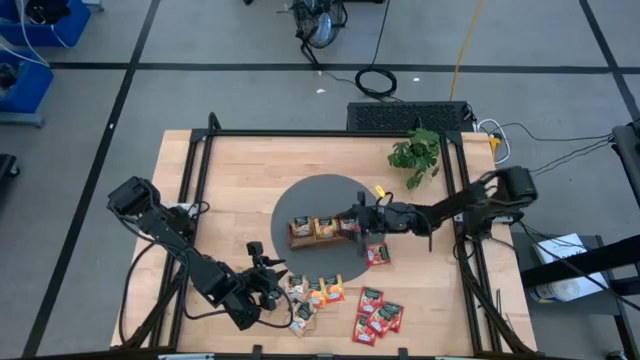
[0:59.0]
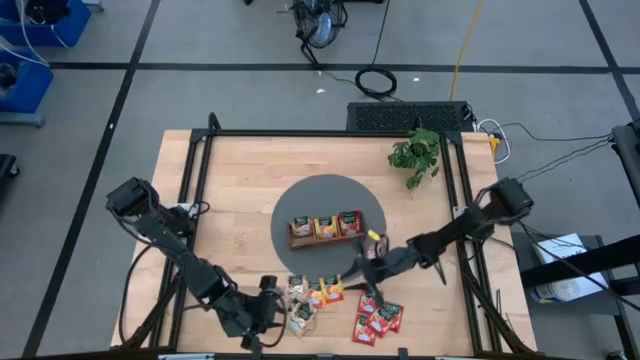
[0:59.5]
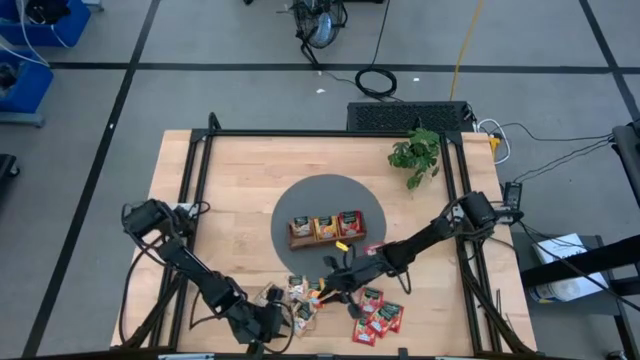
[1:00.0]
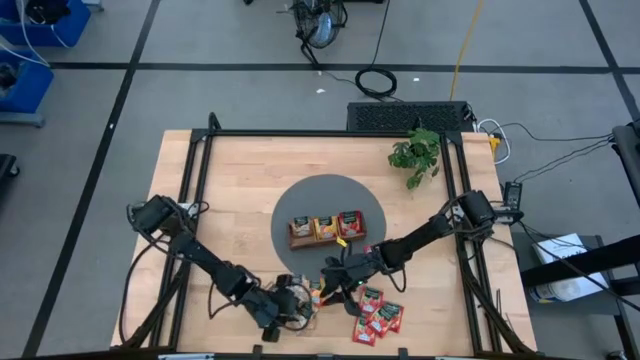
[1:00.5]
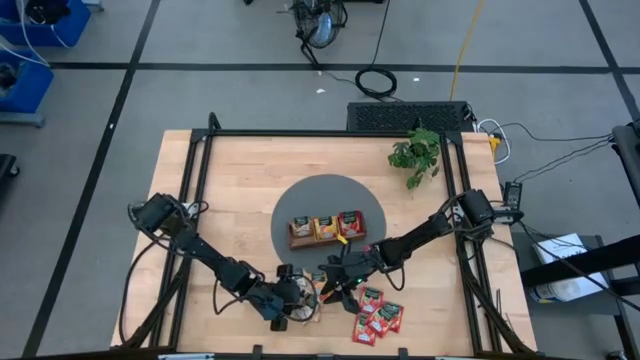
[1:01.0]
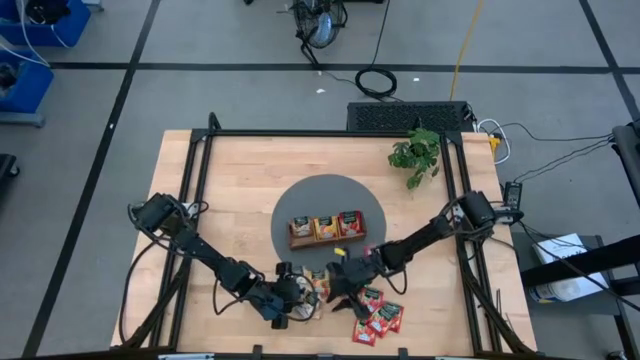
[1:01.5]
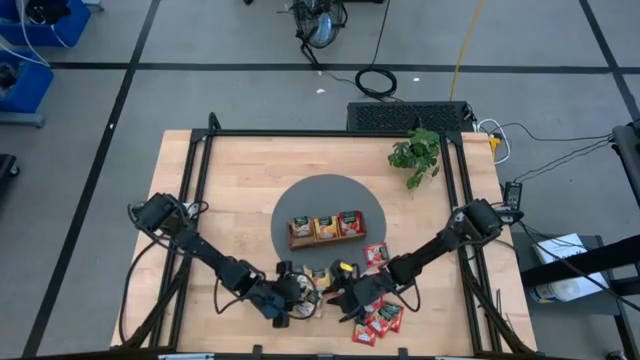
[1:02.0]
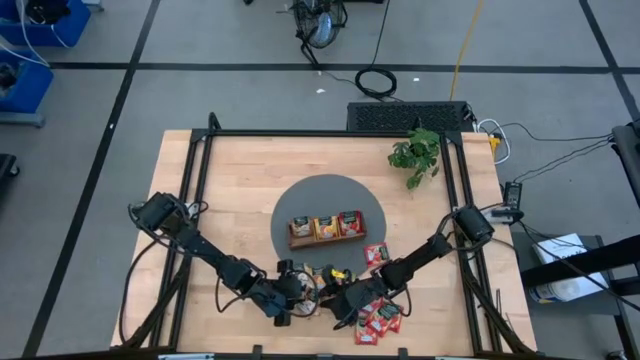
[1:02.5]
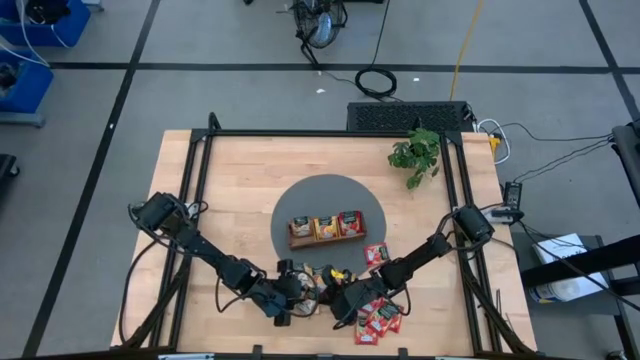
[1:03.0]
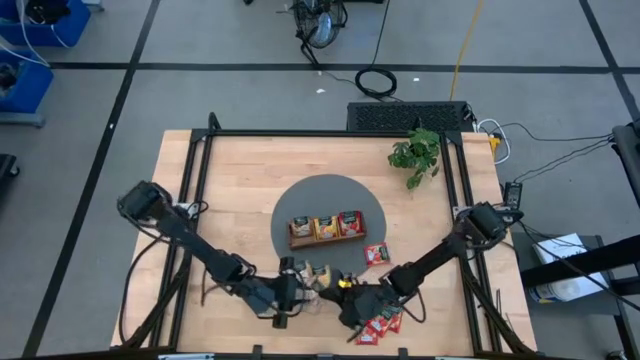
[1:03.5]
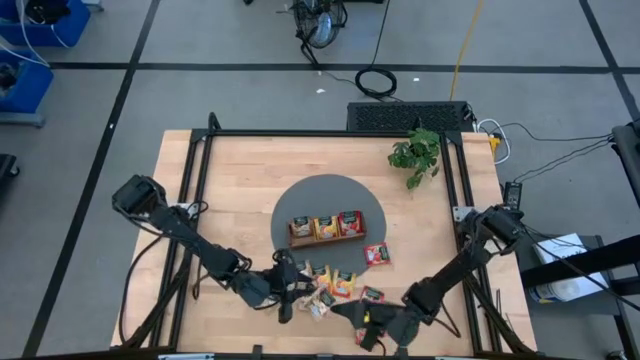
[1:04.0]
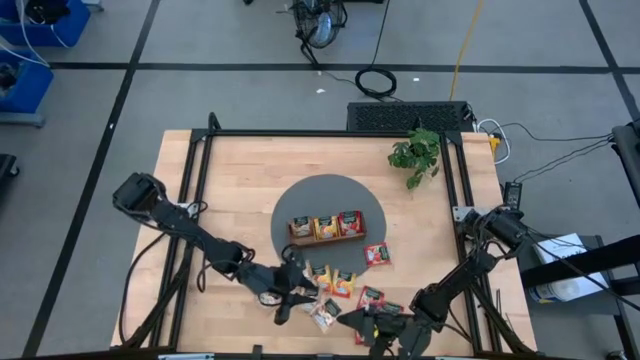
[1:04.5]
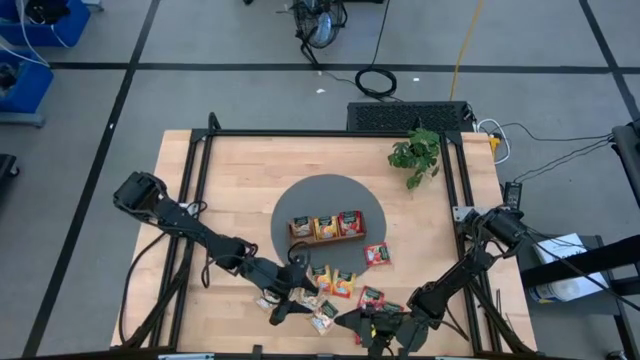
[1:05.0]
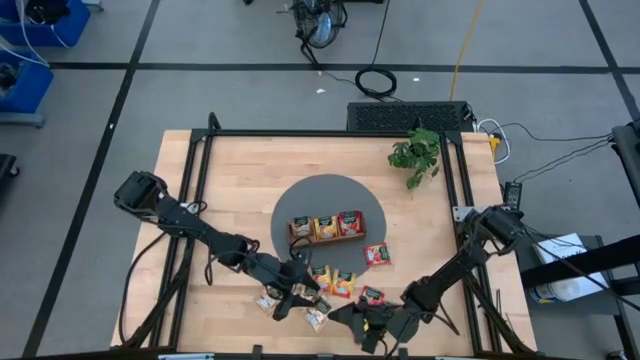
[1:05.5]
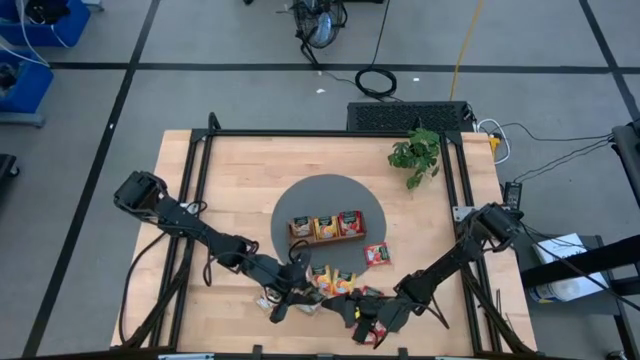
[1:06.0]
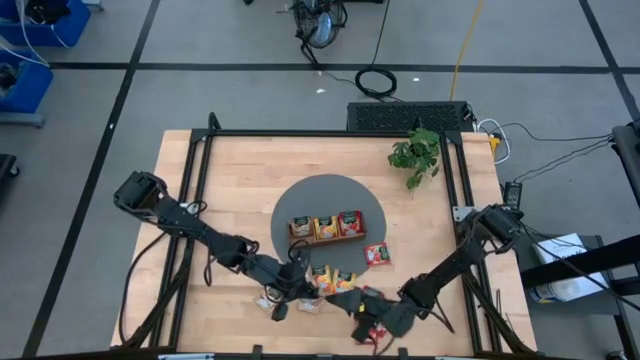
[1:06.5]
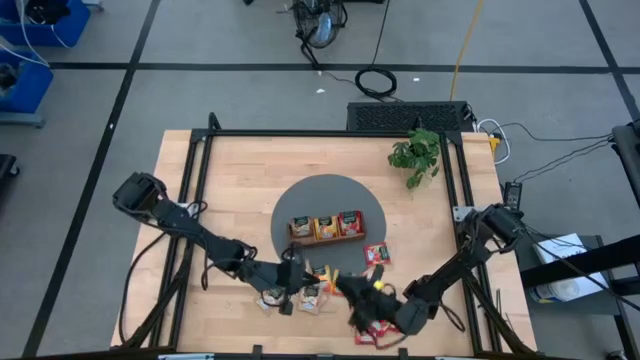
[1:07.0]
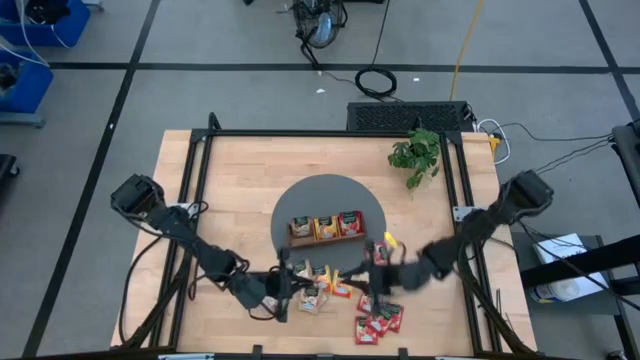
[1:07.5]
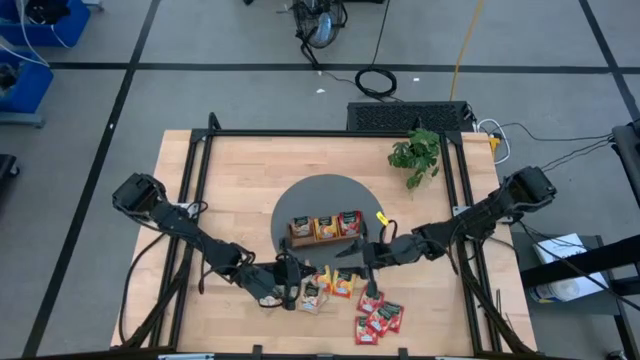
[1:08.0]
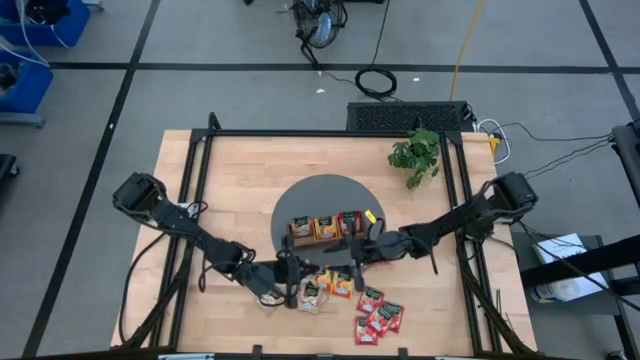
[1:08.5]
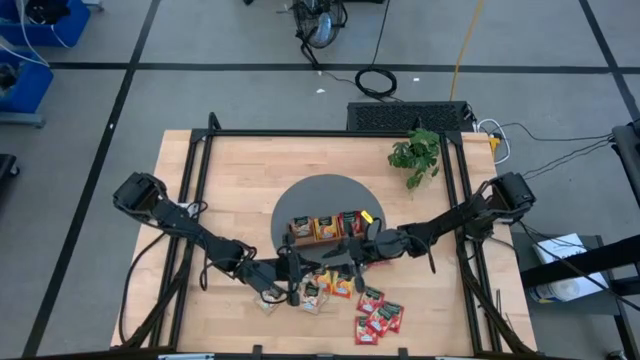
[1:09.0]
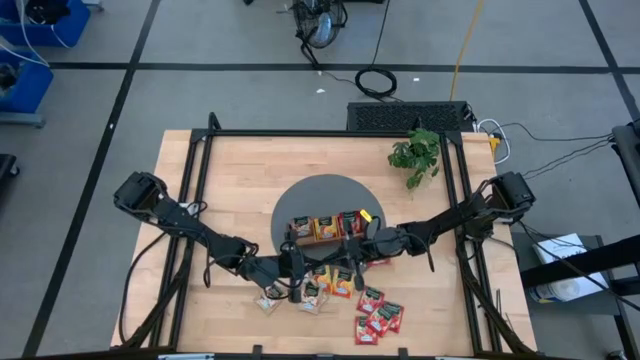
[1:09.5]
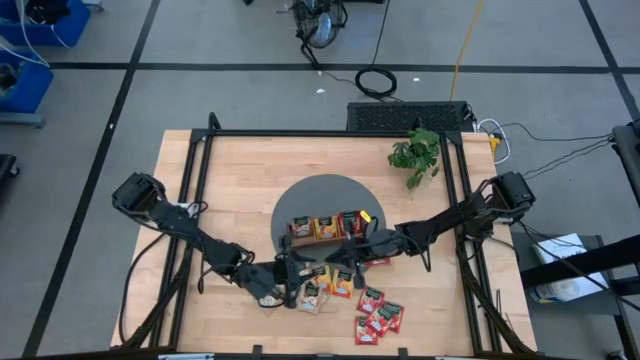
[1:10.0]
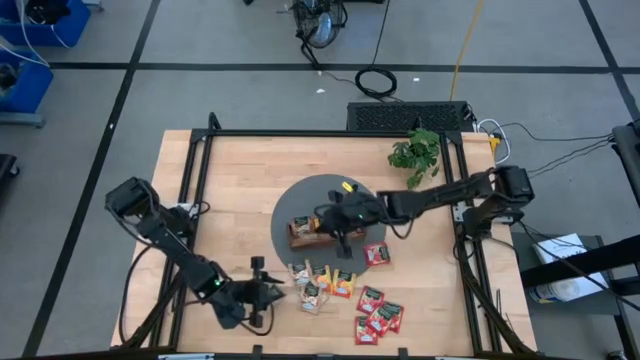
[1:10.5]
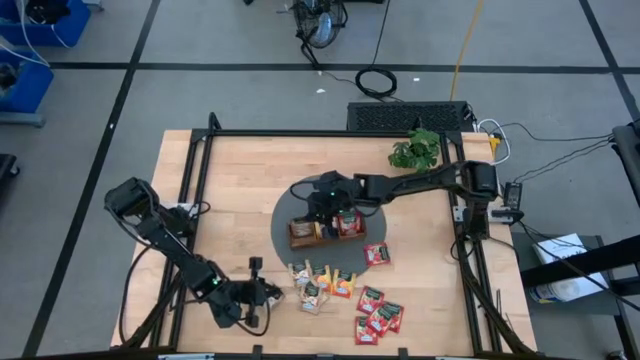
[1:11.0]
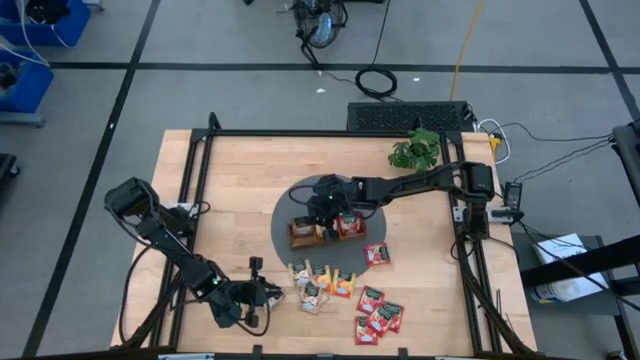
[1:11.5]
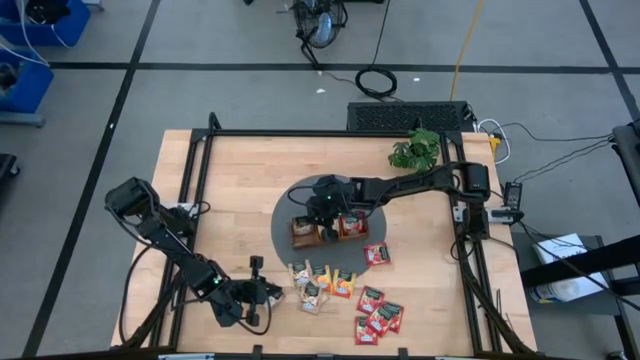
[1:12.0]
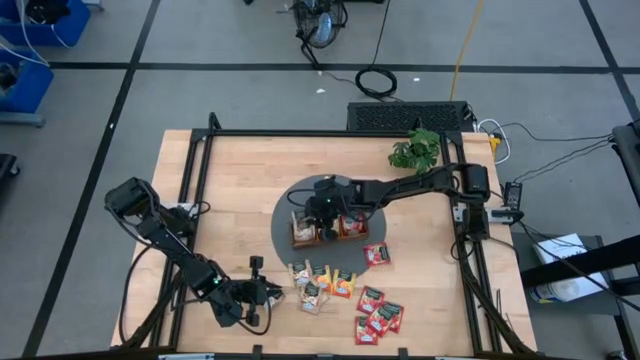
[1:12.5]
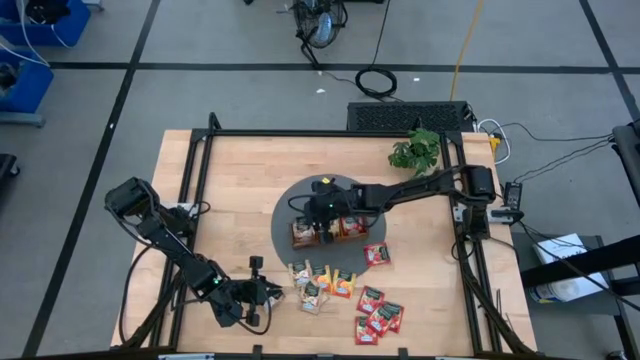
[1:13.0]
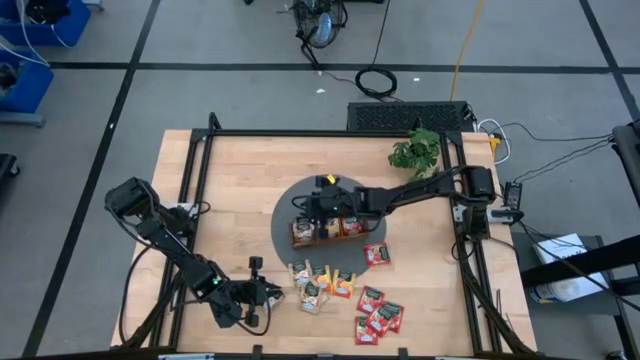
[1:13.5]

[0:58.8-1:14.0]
Task: Pick & Place Tea
Put the brown tea bag into the left section of the wooden organizer

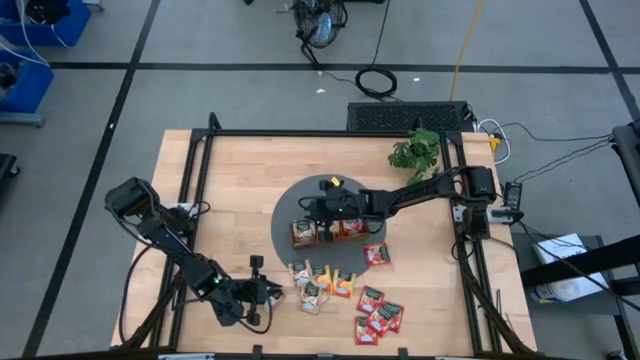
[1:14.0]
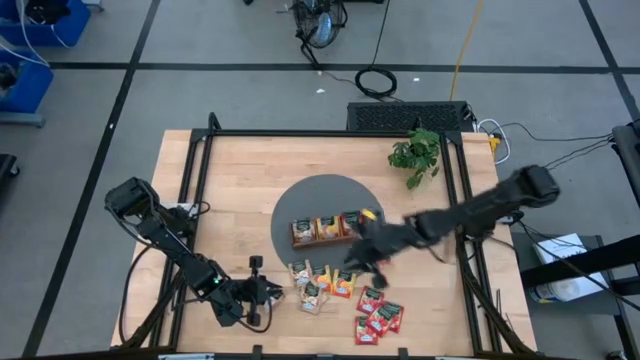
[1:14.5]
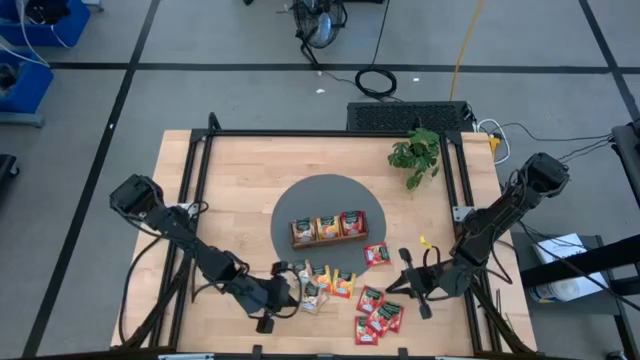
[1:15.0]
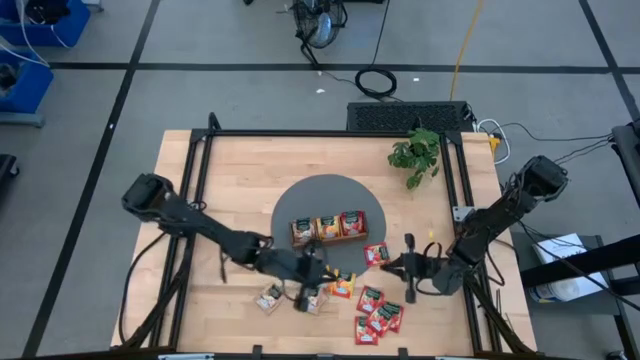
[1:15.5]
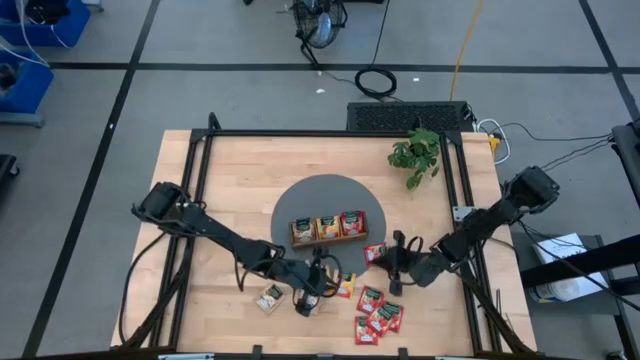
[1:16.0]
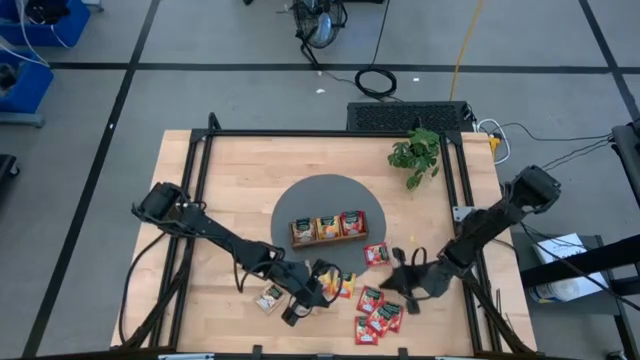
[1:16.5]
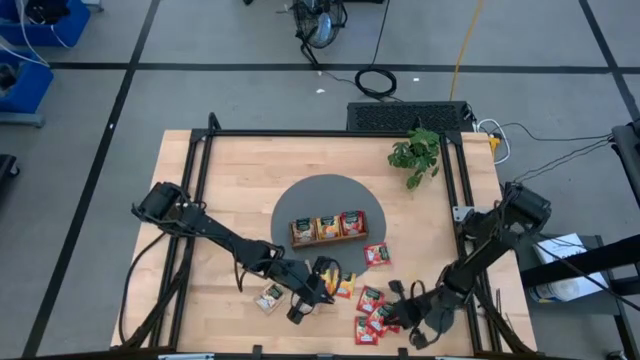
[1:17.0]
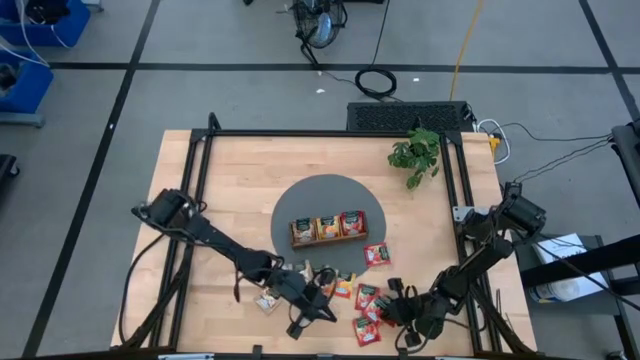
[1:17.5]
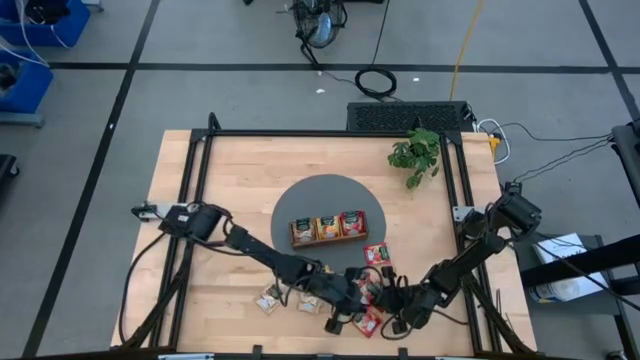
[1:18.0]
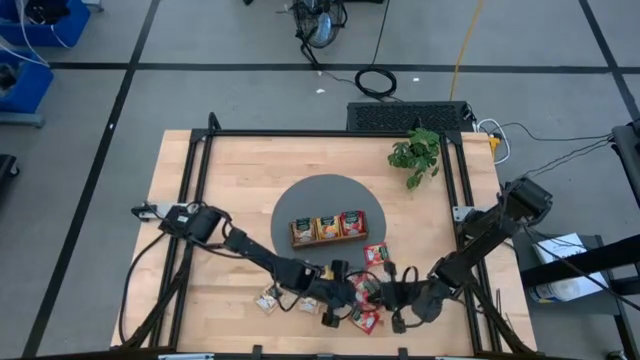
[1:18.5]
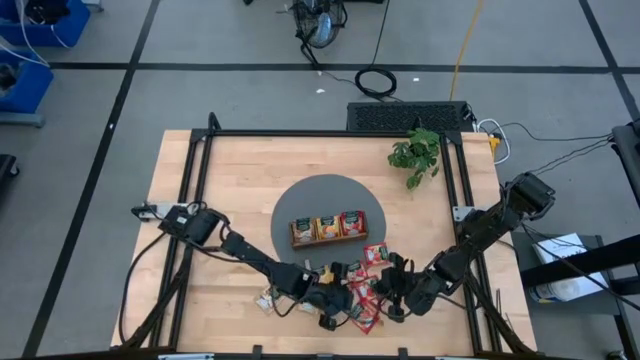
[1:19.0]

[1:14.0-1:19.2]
Adjust the red tea bags on the table

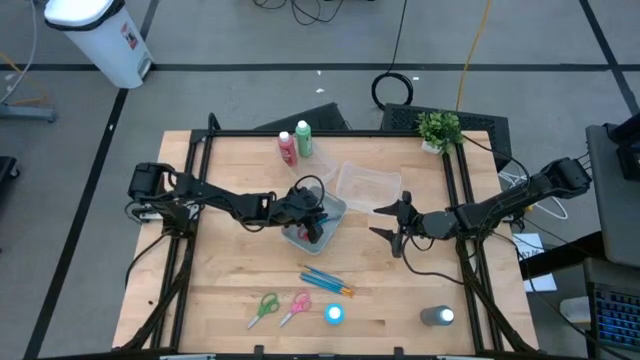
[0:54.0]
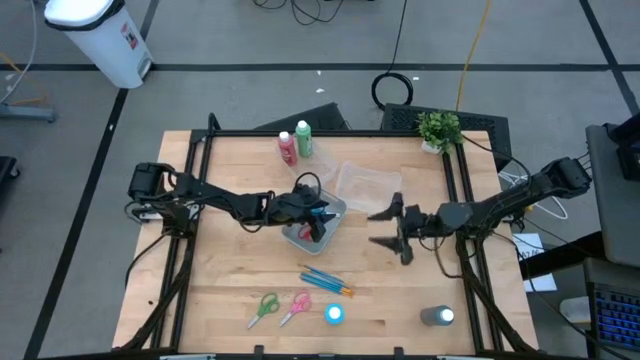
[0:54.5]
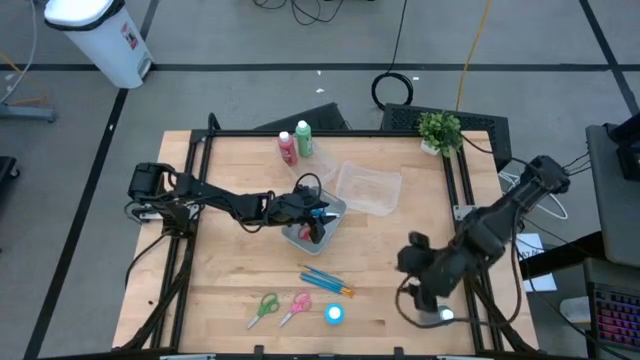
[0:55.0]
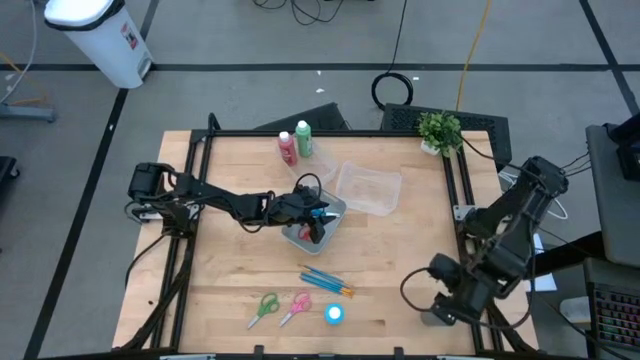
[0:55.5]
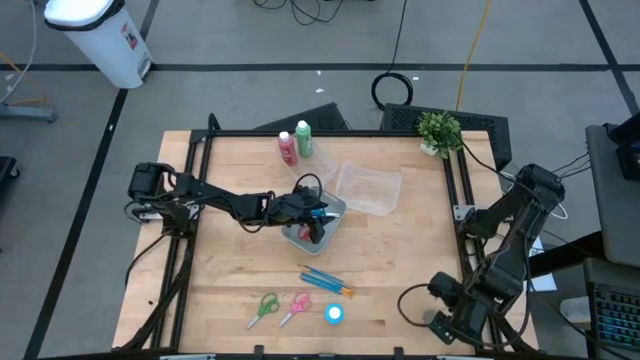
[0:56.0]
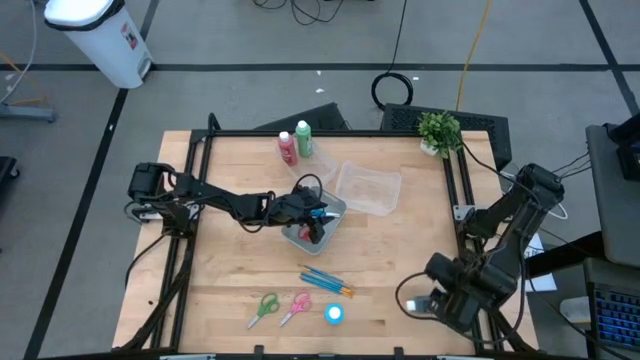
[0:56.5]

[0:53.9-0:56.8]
Task: Pick & Place Paint Supplies
Put the black paint bottle into the left transparent bin
